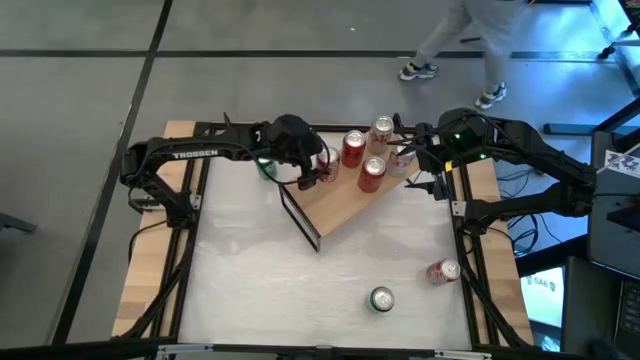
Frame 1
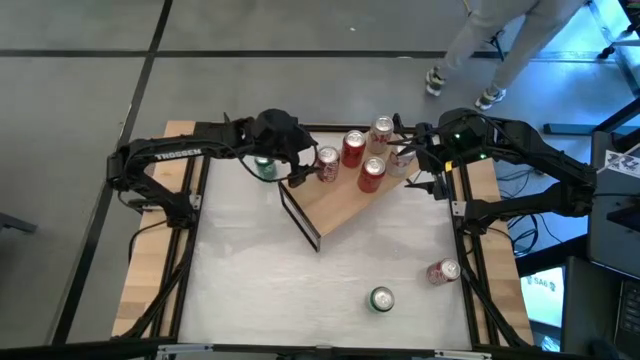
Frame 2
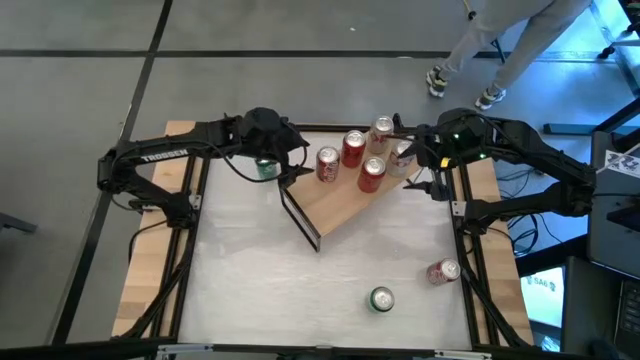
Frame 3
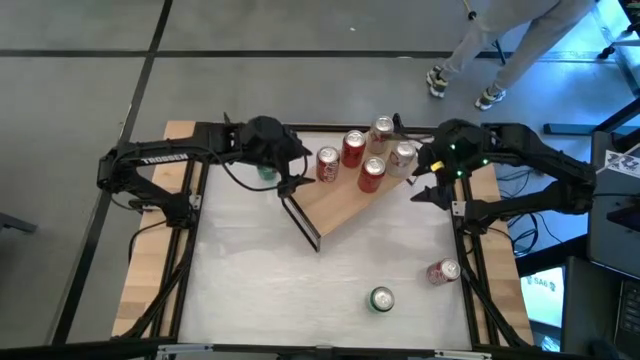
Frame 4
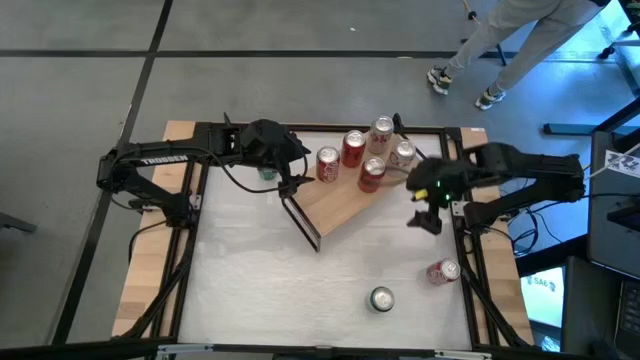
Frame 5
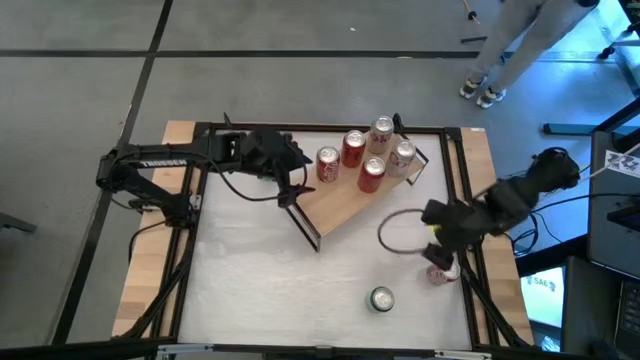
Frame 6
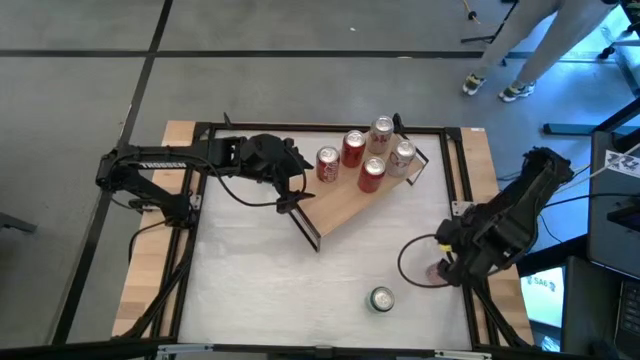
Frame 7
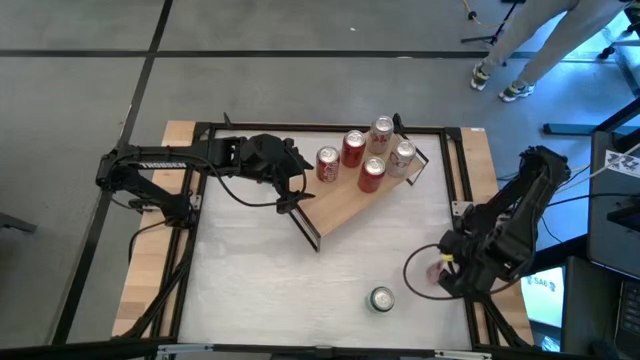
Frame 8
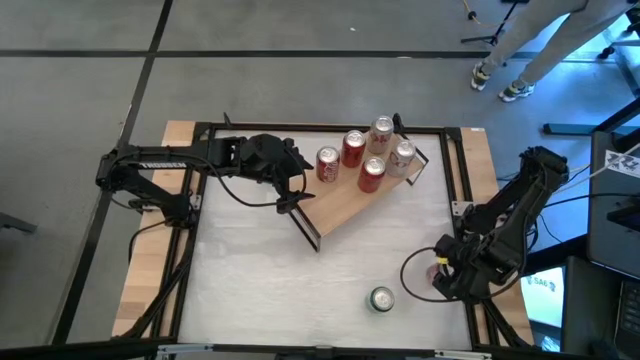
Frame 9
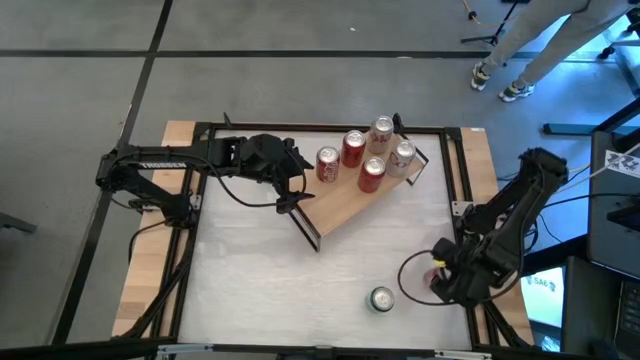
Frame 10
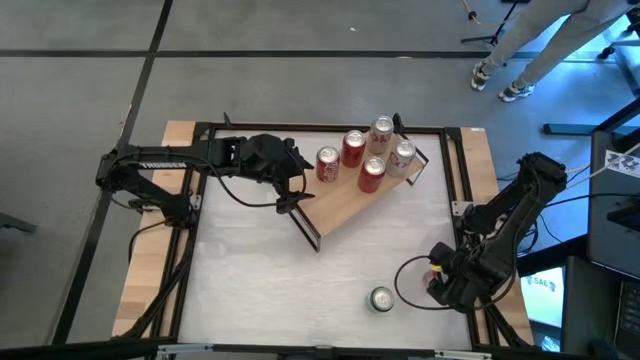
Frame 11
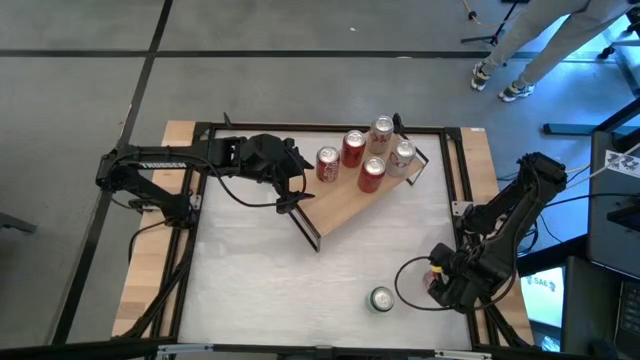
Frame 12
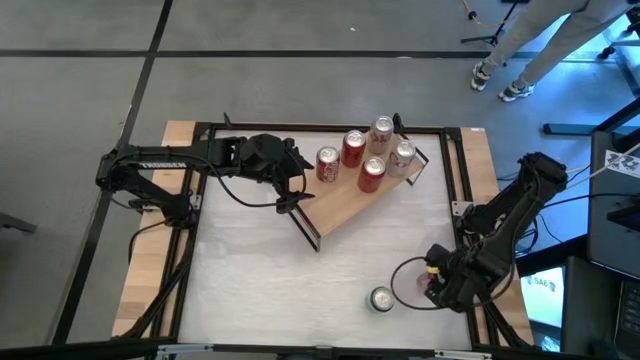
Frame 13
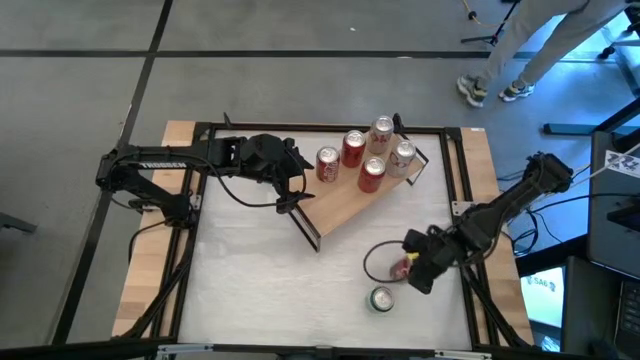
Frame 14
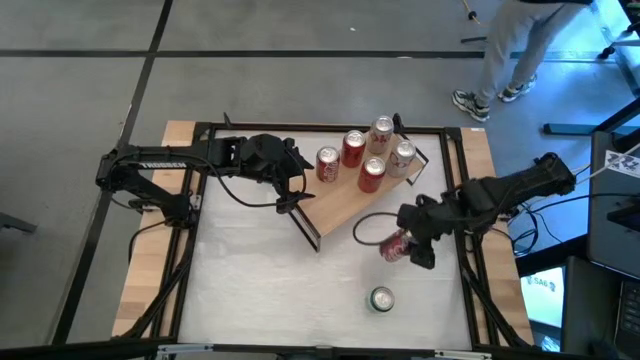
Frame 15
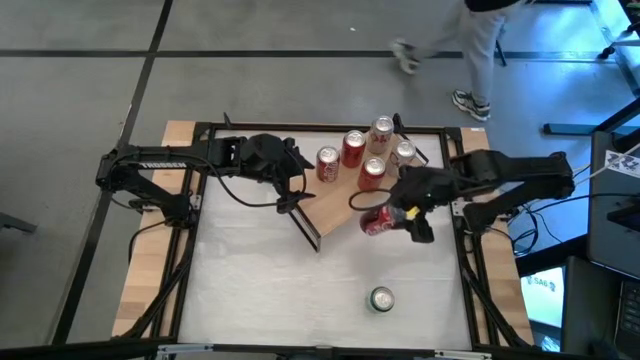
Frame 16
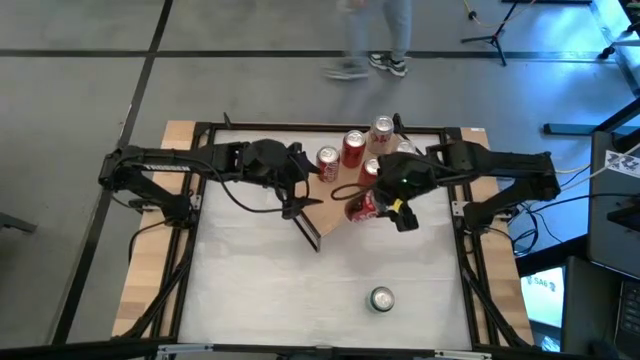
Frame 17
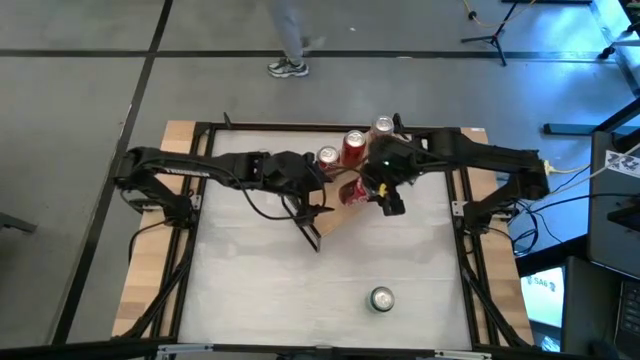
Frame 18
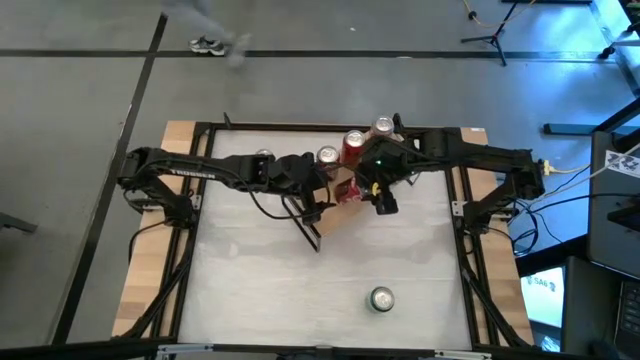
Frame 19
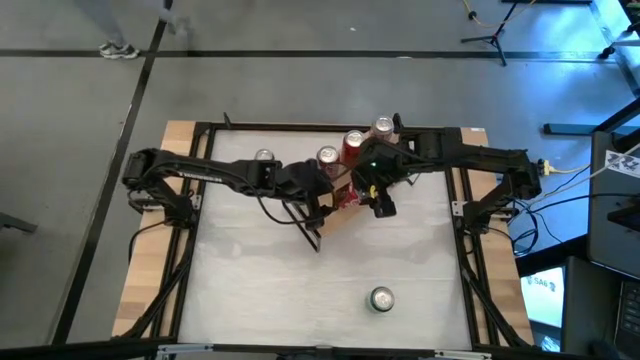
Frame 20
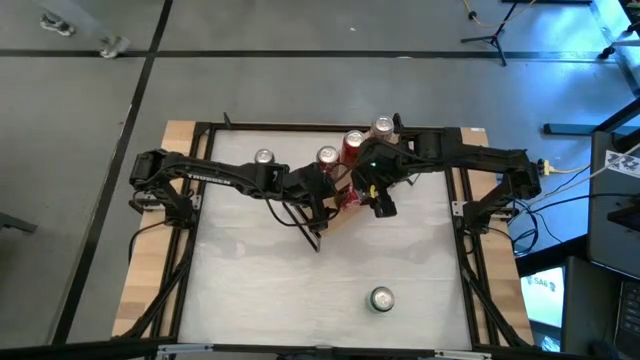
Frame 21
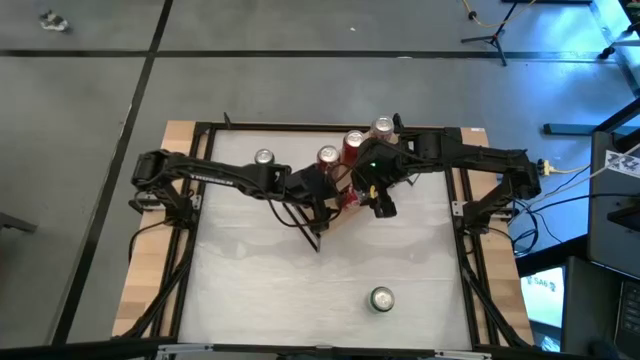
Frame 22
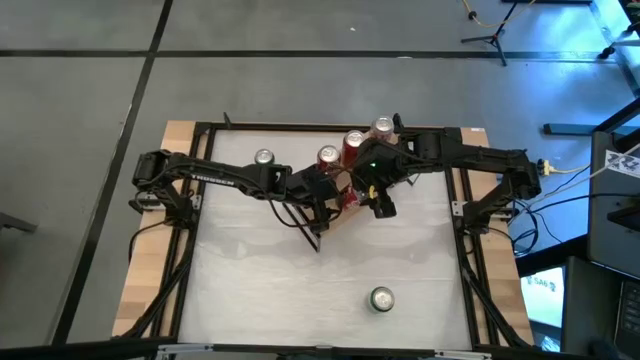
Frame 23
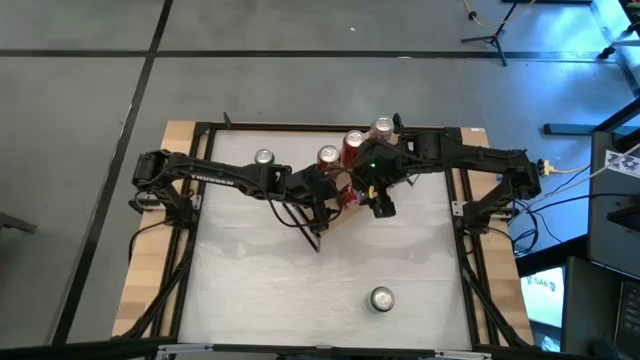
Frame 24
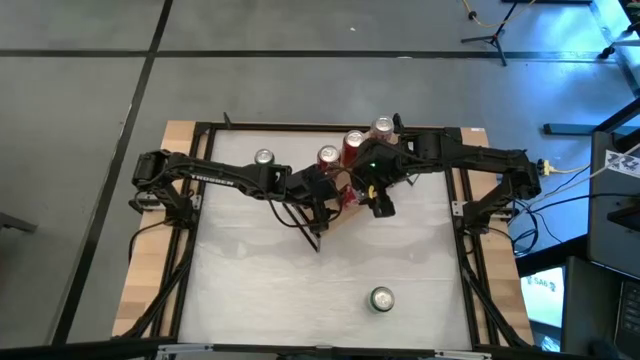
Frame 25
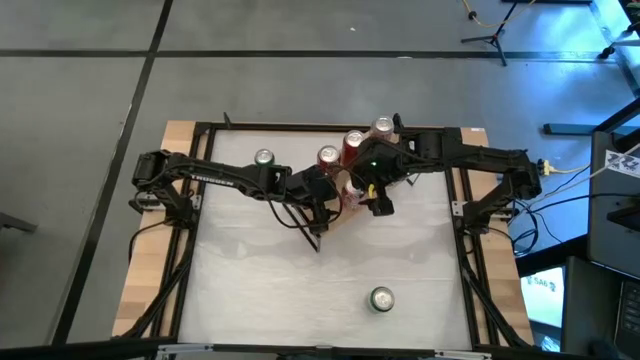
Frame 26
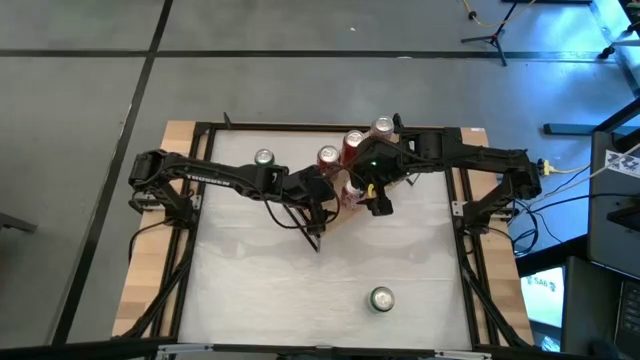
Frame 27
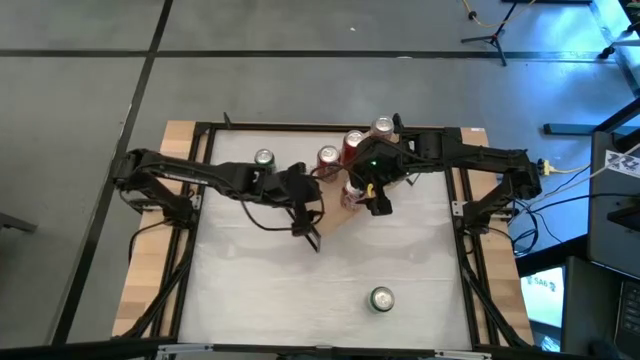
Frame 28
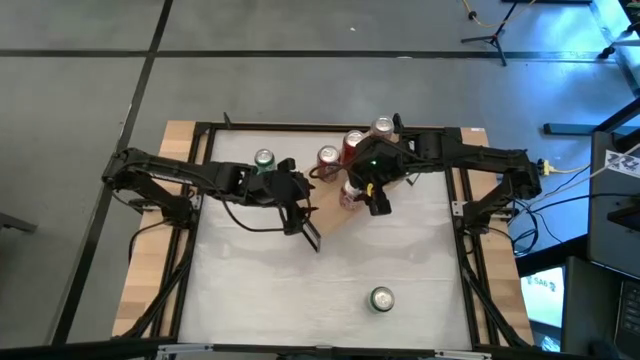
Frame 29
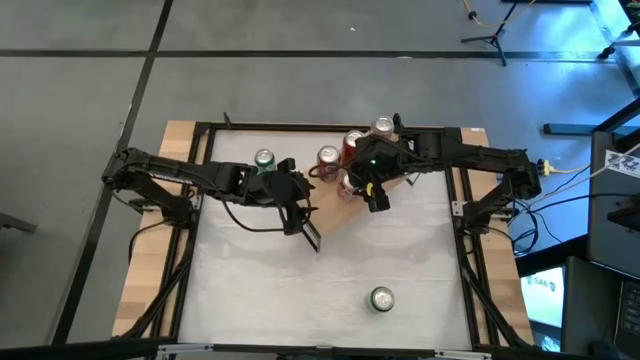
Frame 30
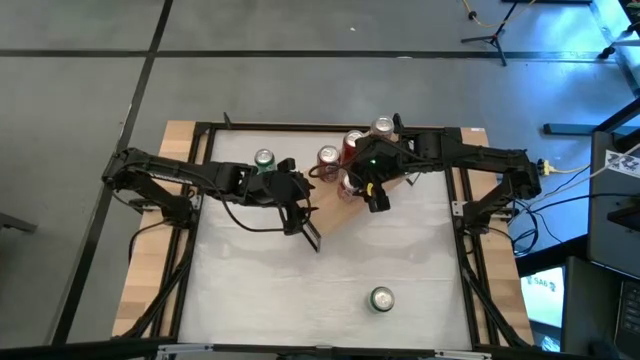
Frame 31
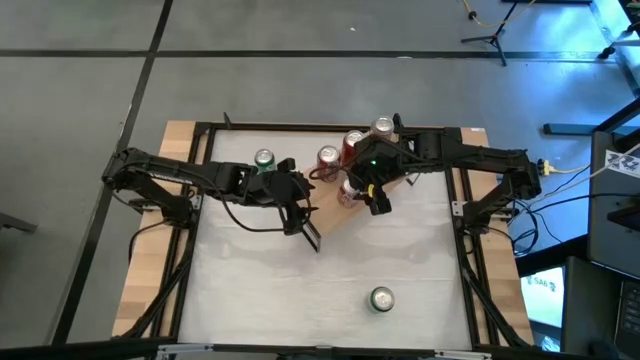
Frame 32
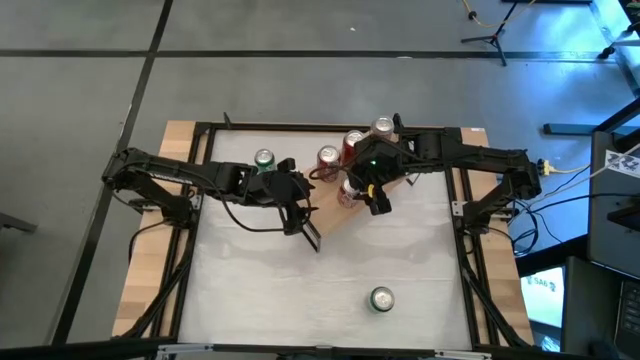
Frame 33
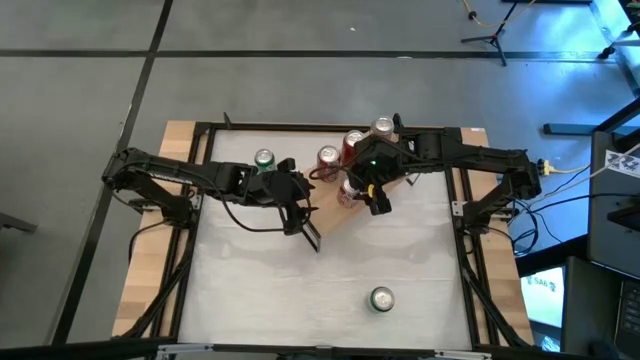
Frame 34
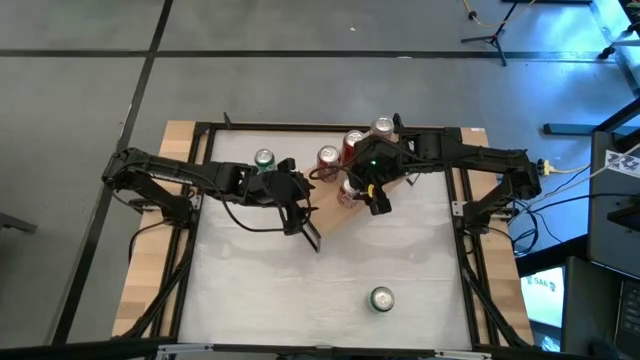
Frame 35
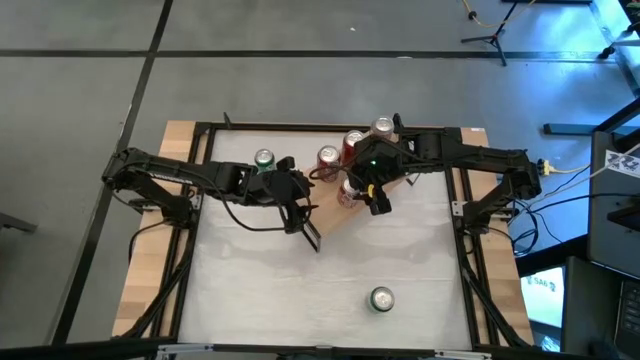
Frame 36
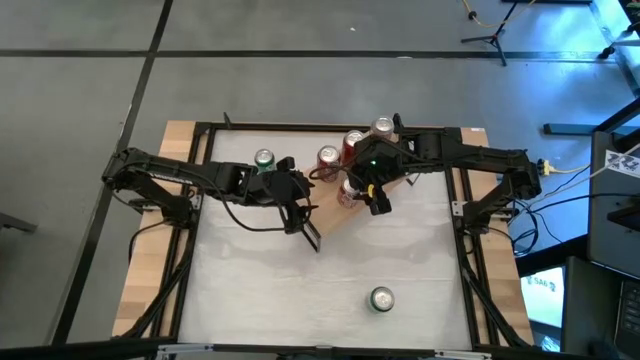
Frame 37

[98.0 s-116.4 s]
Task: Place canned beverage on shelf
Put the red and white soda can on the shelf aligned with the other red and white soda can
